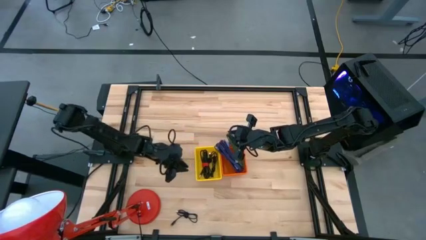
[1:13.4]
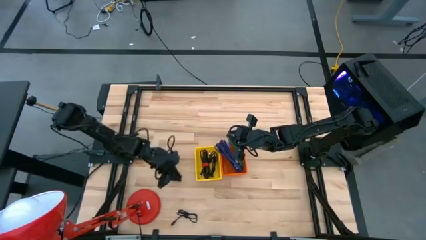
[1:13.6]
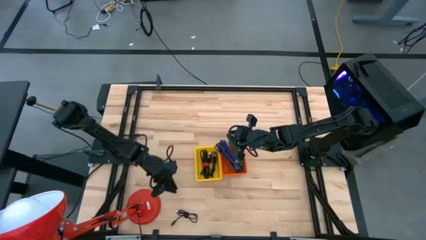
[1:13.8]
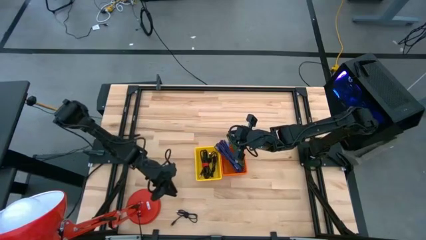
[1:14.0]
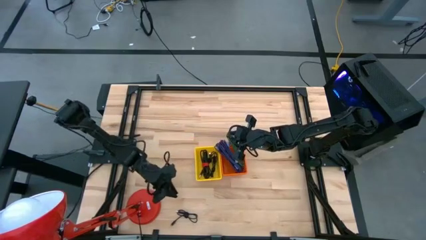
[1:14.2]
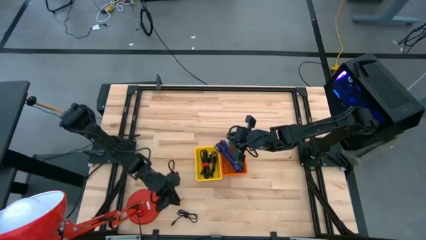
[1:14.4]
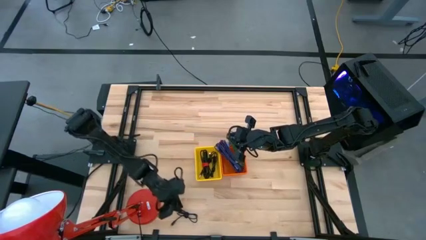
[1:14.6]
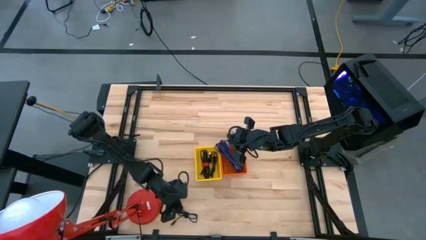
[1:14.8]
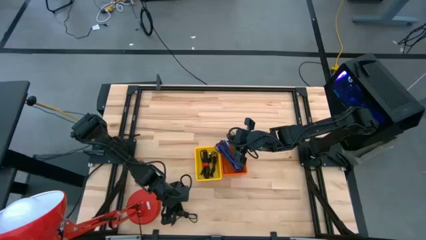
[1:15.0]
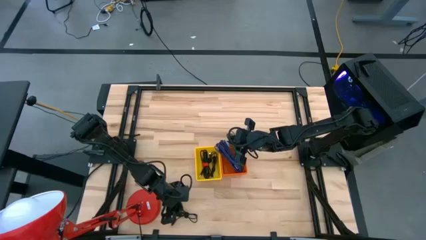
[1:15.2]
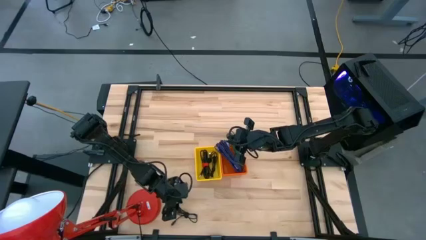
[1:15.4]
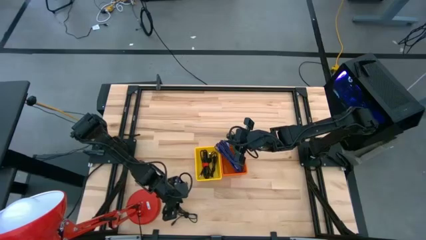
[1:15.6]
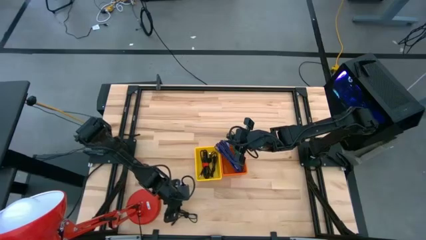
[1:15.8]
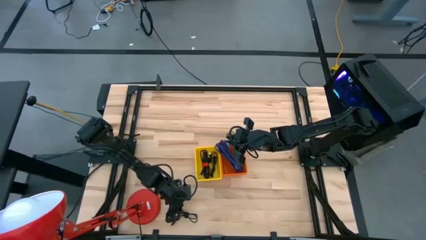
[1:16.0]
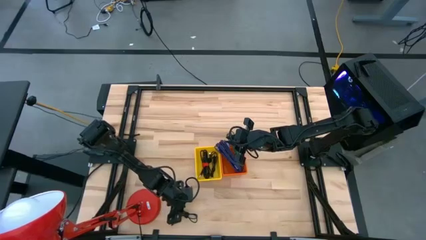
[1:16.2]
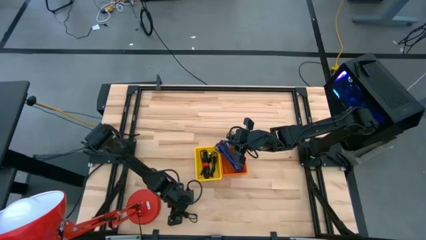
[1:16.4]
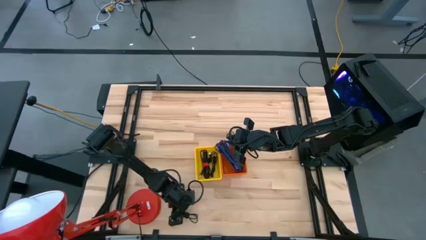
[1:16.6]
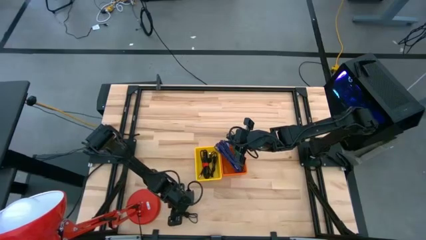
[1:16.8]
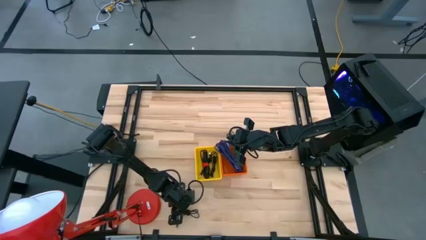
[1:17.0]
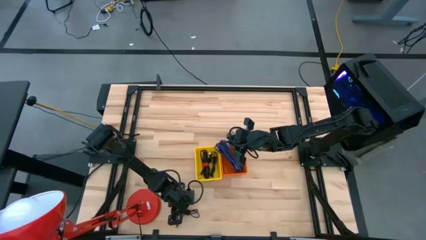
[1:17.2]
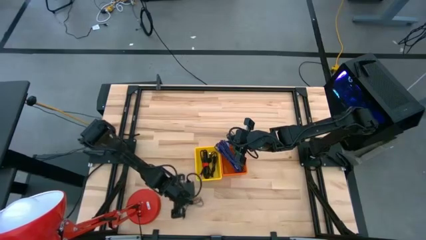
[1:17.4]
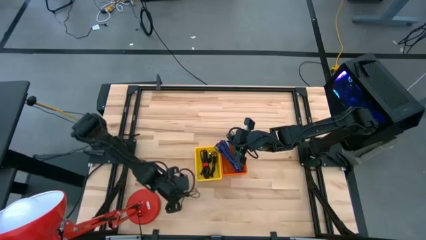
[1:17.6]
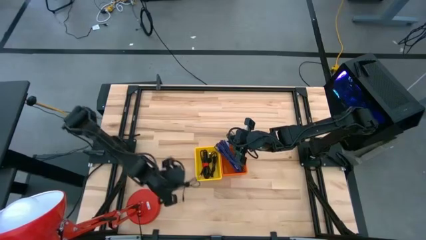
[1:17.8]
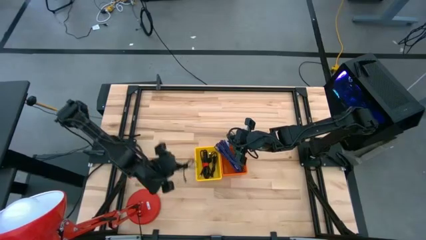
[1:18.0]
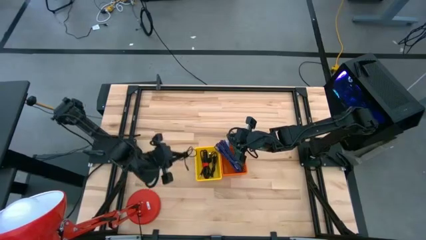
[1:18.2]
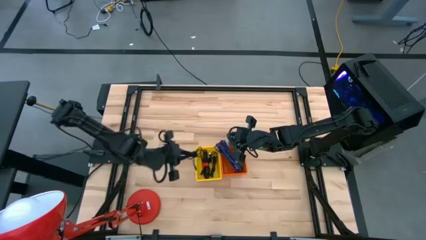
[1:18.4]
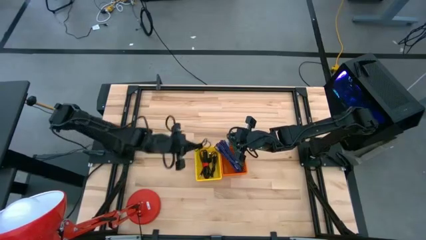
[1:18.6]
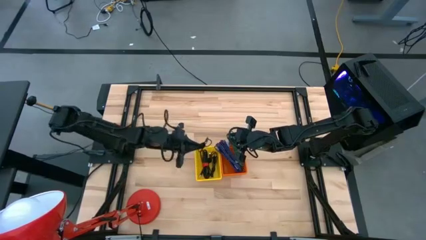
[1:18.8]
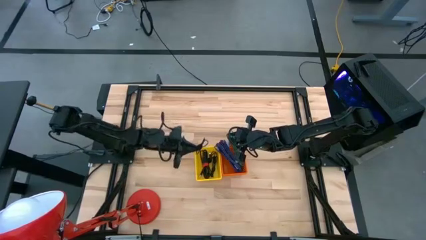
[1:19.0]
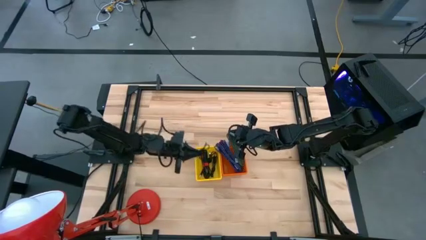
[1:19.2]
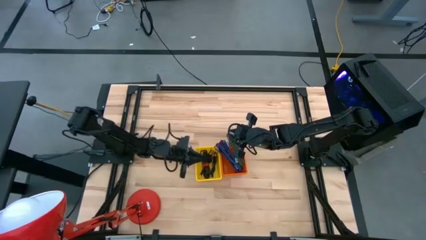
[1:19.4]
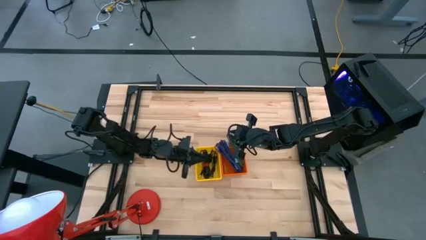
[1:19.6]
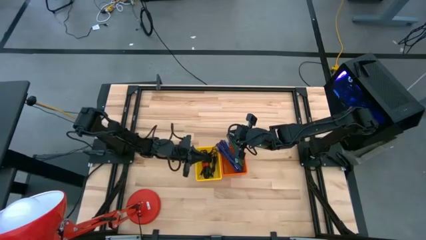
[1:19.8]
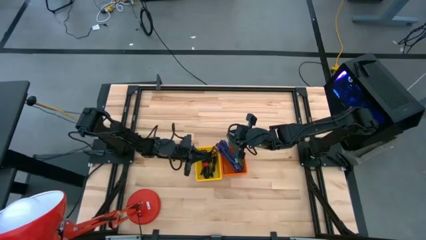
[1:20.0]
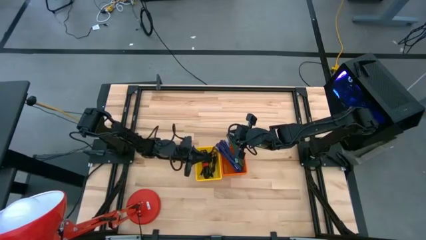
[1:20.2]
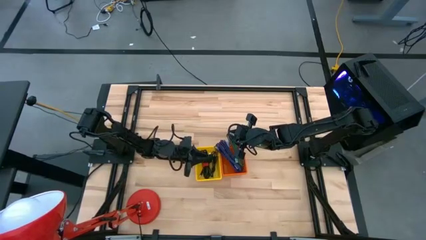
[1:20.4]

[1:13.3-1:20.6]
Task: Pick & Place USB Port
Put the black charger cable into the yellow bin

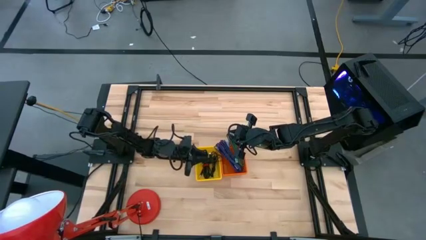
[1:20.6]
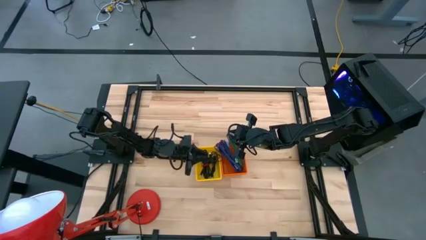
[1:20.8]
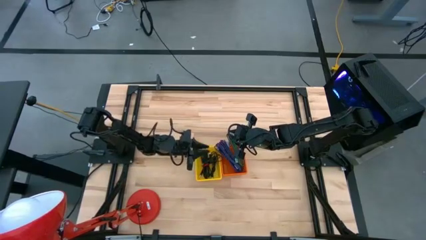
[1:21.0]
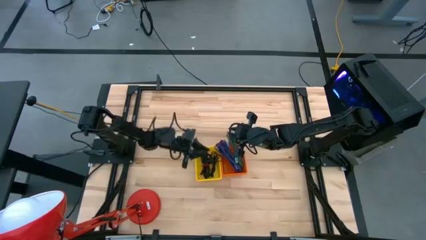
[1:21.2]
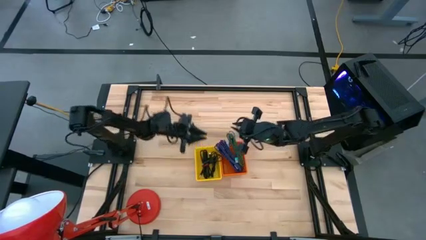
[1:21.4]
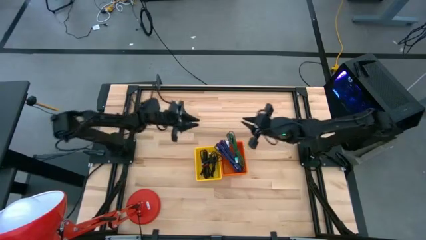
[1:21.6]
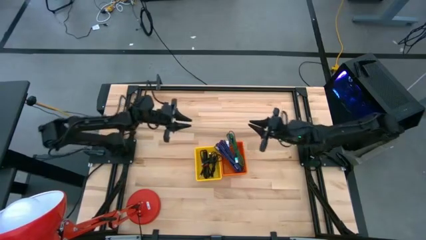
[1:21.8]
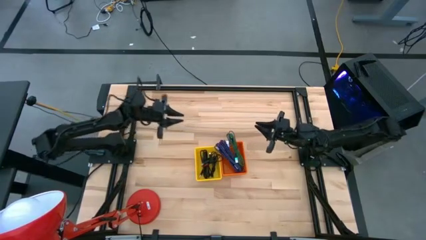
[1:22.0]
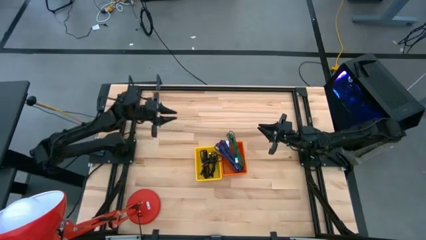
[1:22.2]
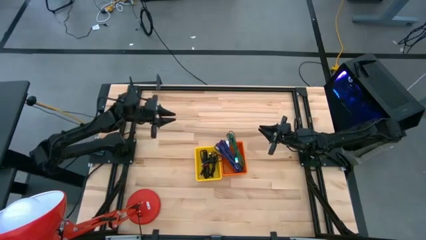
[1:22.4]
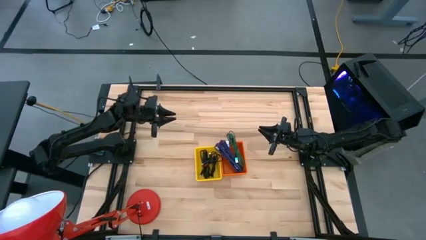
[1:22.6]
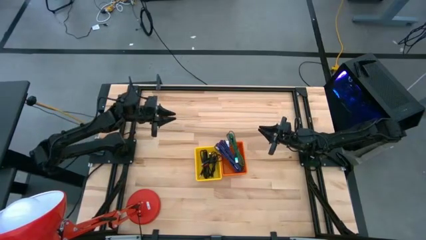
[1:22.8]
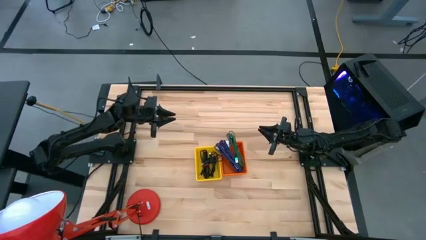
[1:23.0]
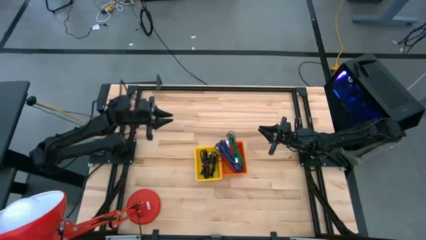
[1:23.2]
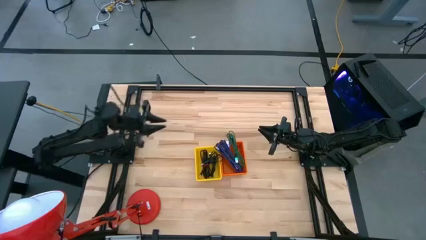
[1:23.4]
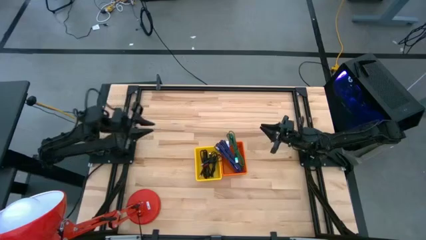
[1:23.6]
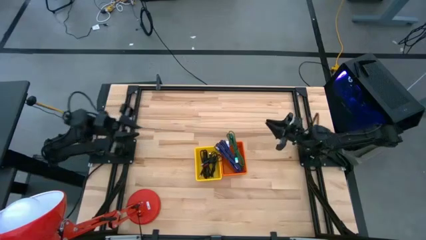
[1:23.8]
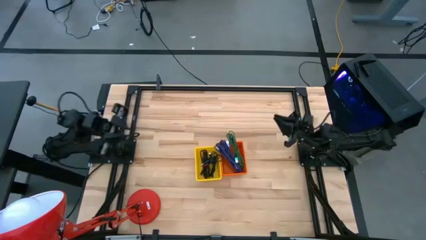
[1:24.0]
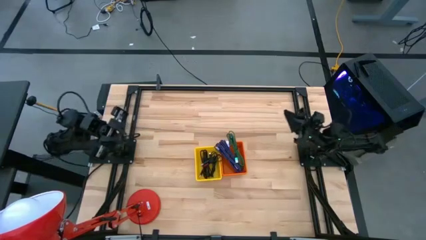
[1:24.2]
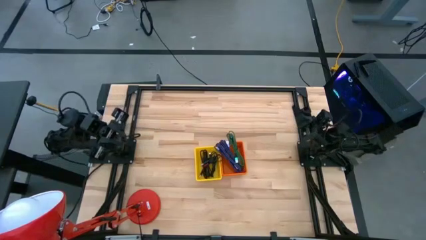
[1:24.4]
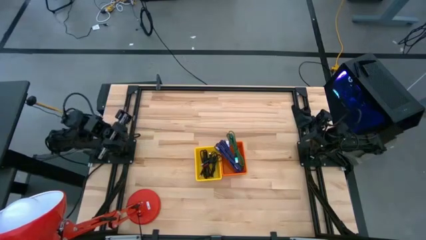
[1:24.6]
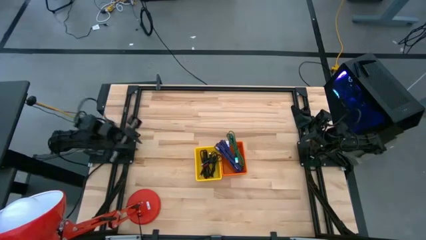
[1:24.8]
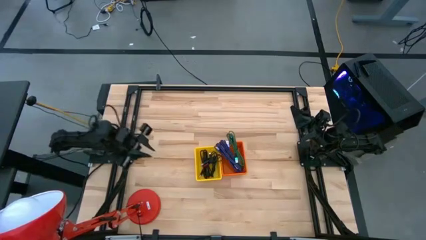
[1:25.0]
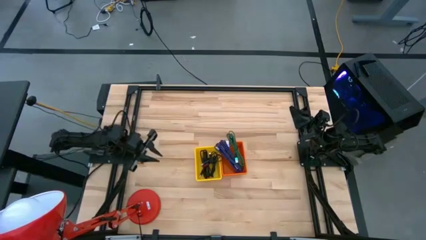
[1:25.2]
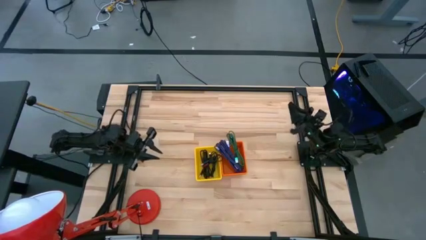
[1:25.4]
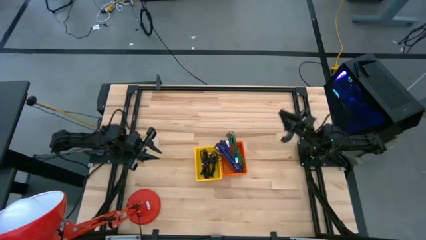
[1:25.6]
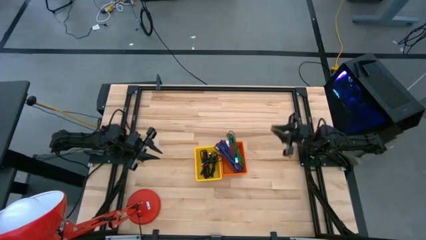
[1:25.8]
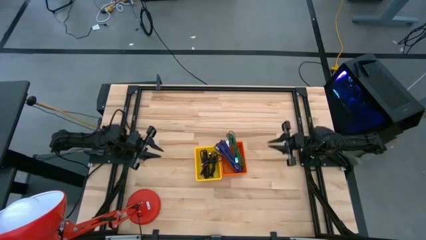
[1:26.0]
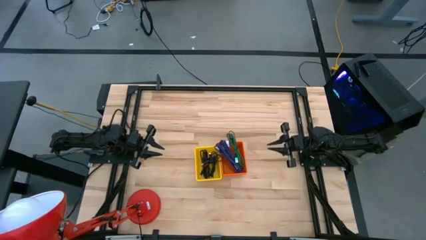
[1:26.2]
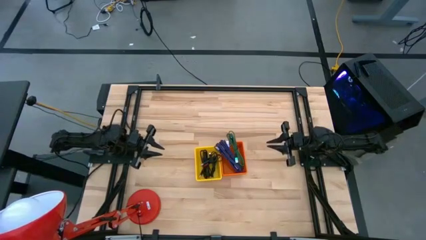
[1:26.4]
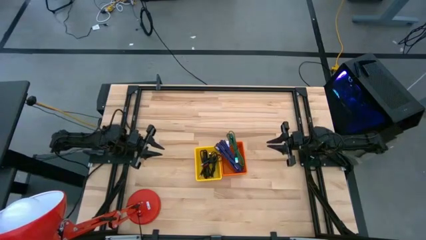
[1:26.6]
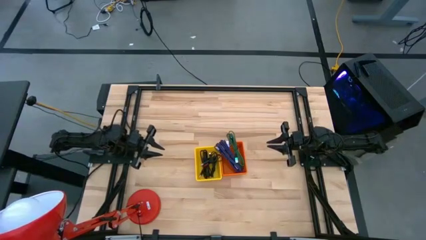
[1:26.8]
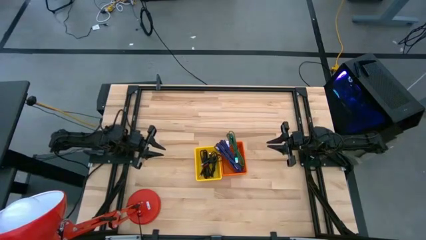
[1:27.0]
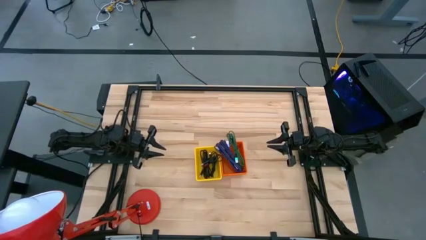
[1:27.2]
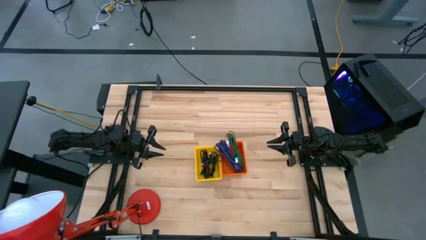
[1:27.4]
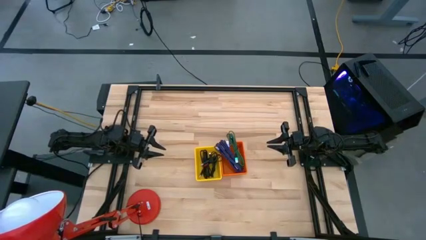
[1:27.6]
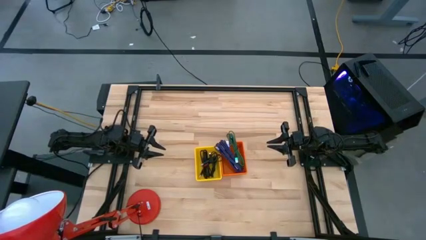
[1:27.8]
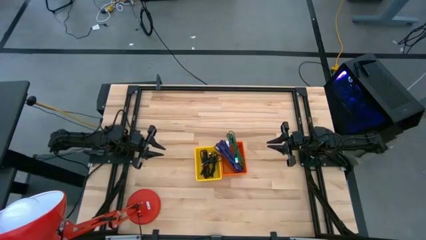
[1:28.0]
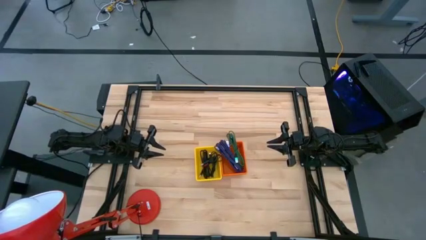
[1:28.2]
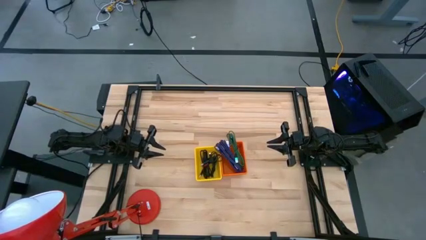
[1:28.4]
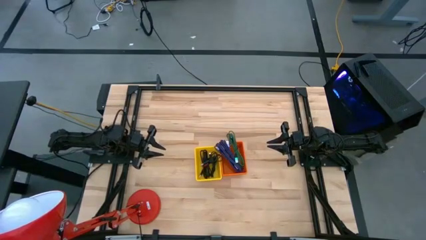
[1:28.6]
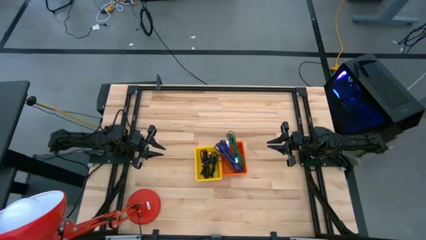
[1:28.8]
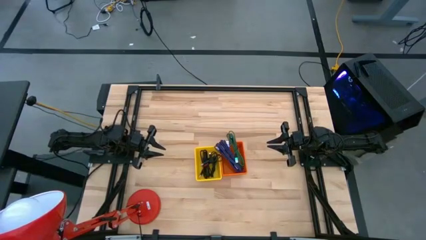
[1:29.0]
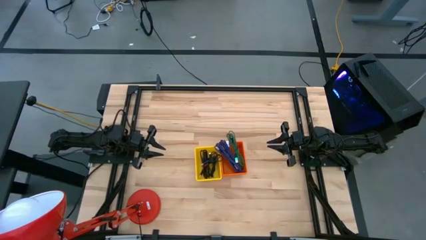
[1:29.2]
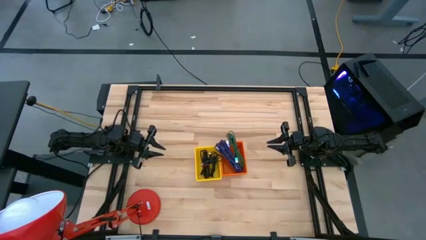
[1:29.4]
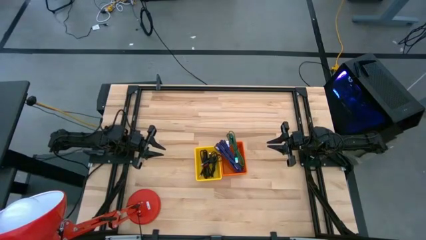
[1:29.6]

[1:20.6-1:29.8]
Return to Home Position
